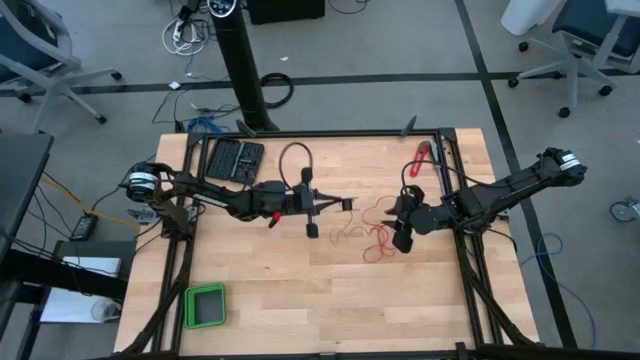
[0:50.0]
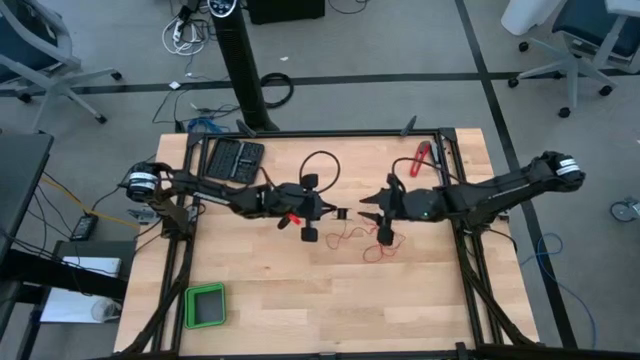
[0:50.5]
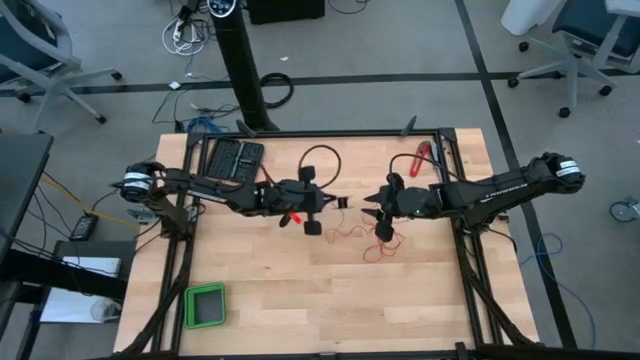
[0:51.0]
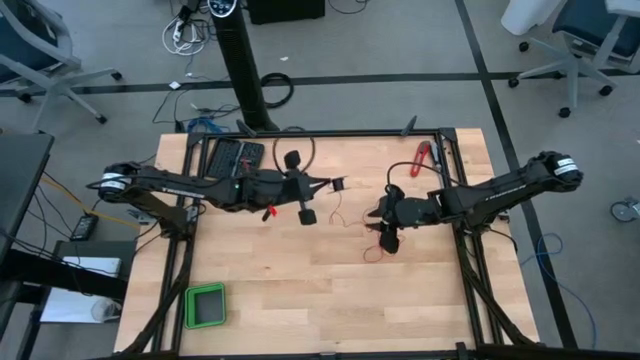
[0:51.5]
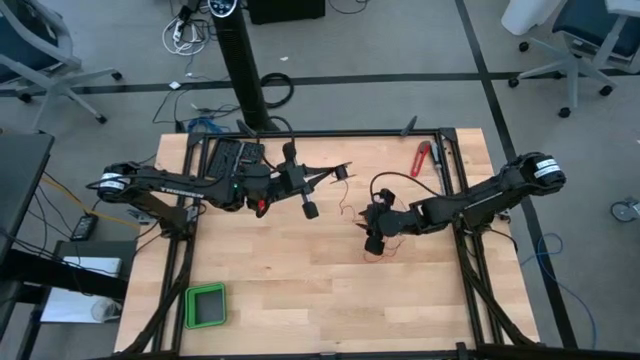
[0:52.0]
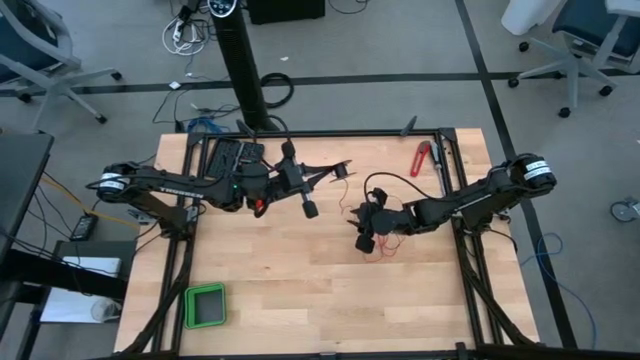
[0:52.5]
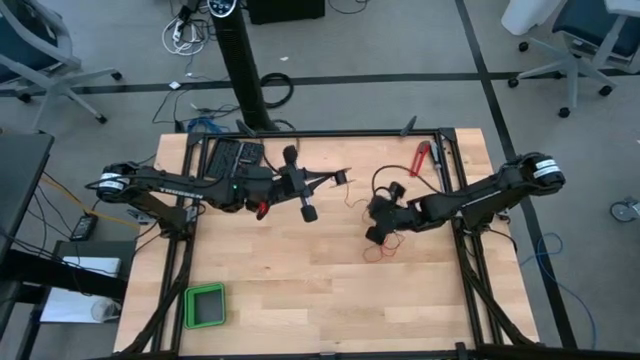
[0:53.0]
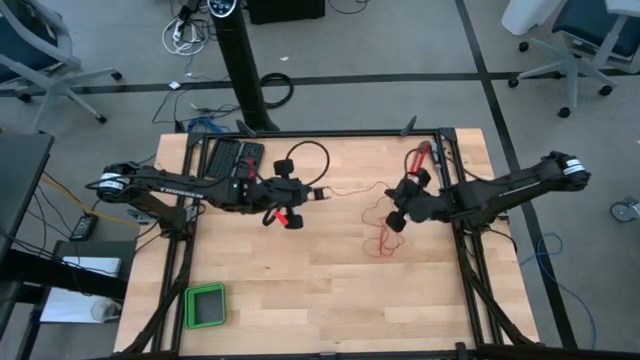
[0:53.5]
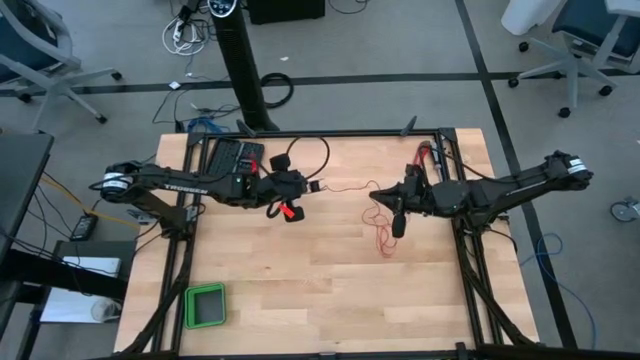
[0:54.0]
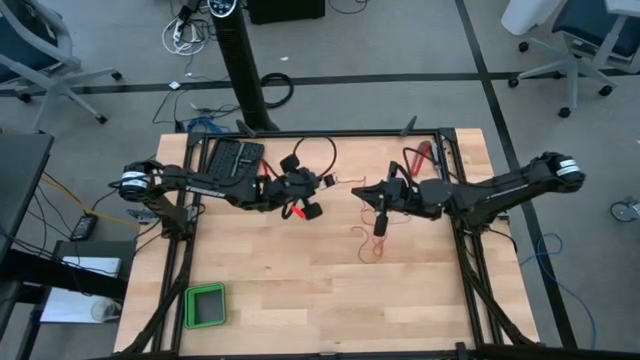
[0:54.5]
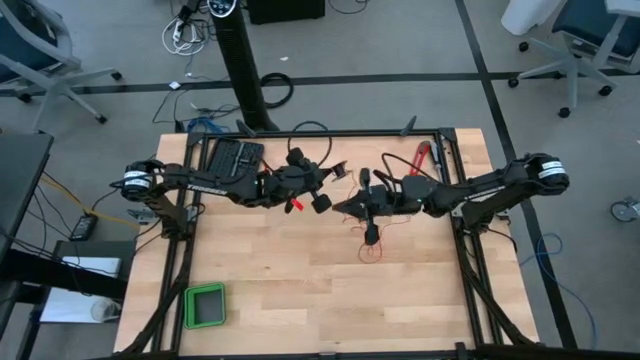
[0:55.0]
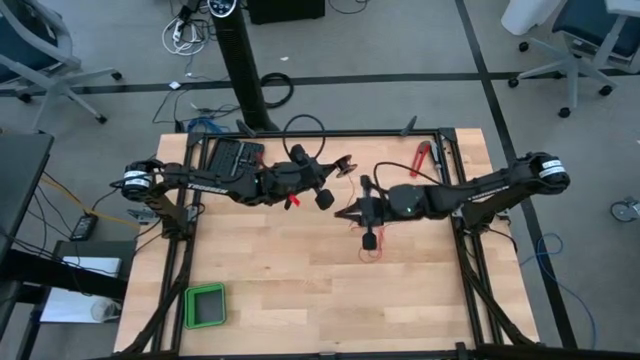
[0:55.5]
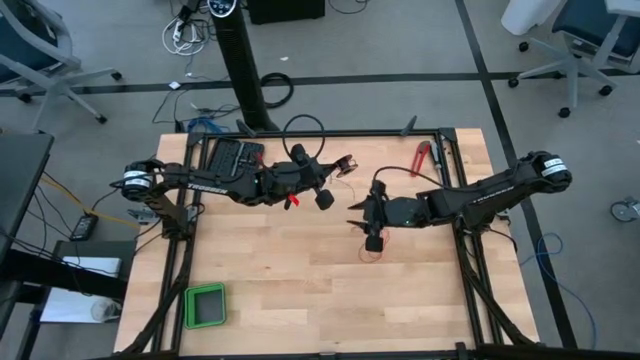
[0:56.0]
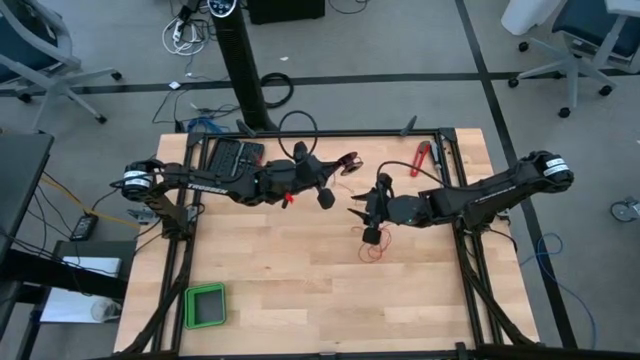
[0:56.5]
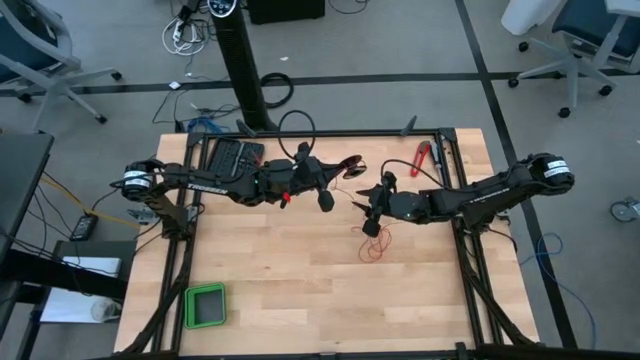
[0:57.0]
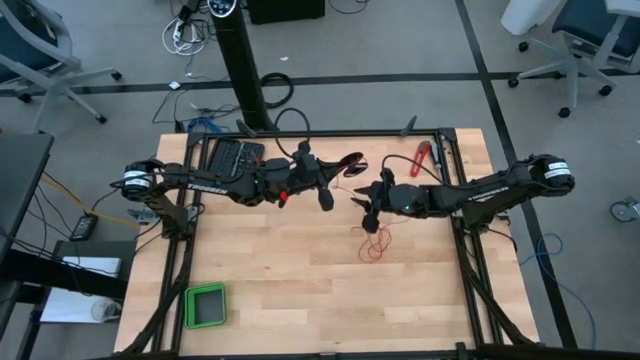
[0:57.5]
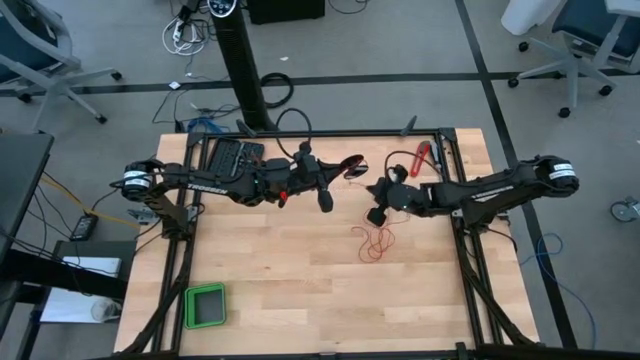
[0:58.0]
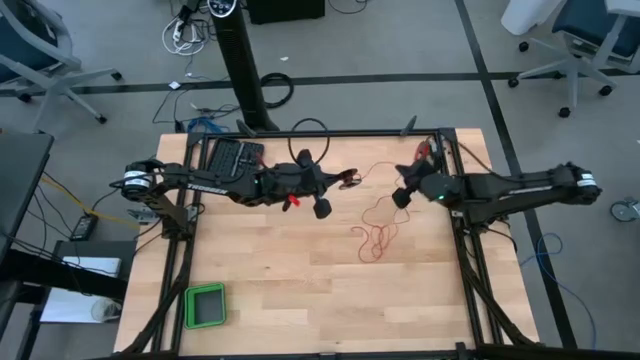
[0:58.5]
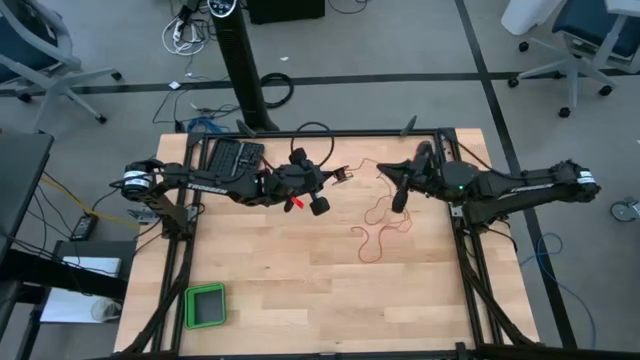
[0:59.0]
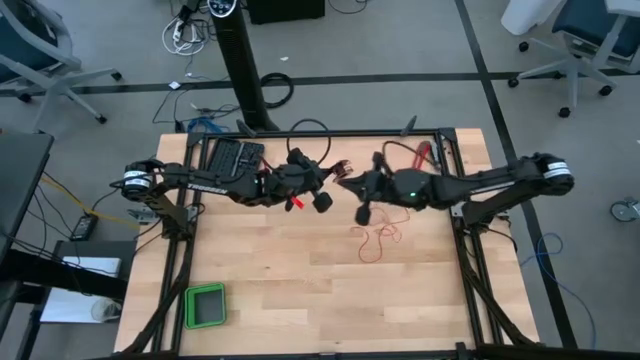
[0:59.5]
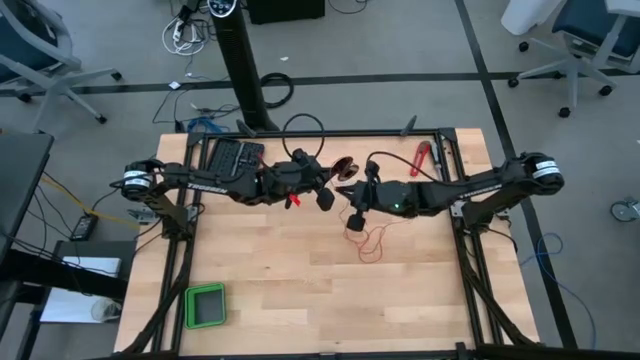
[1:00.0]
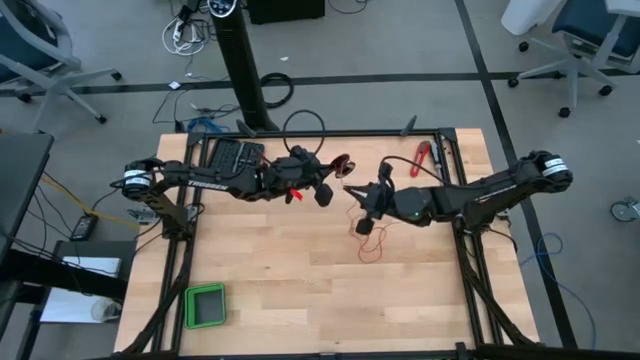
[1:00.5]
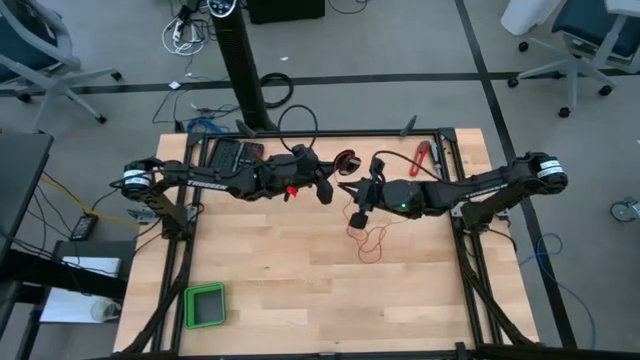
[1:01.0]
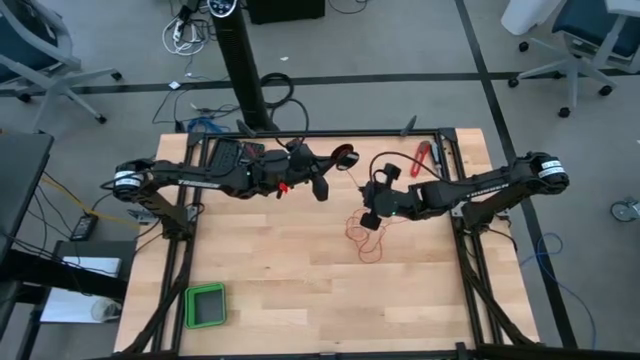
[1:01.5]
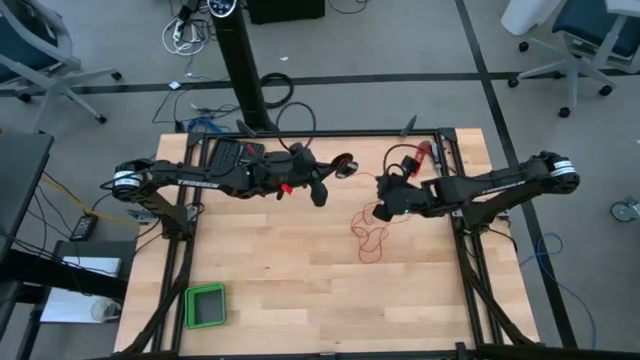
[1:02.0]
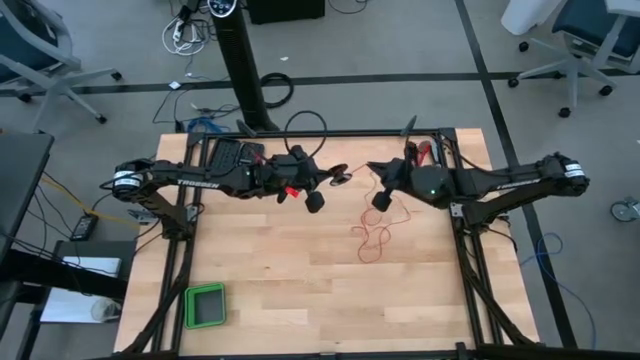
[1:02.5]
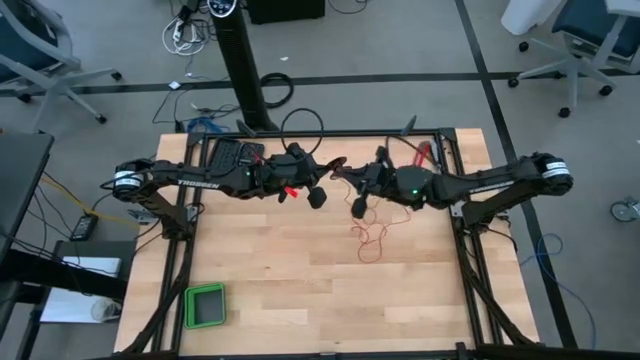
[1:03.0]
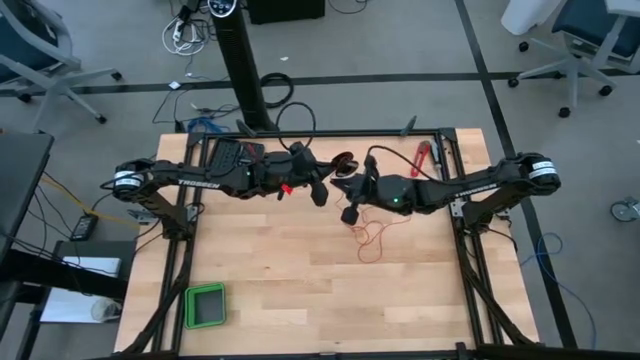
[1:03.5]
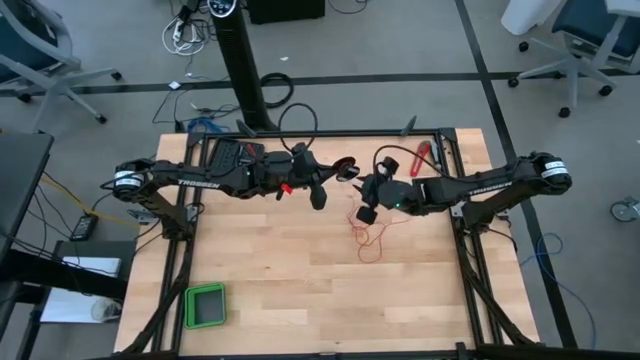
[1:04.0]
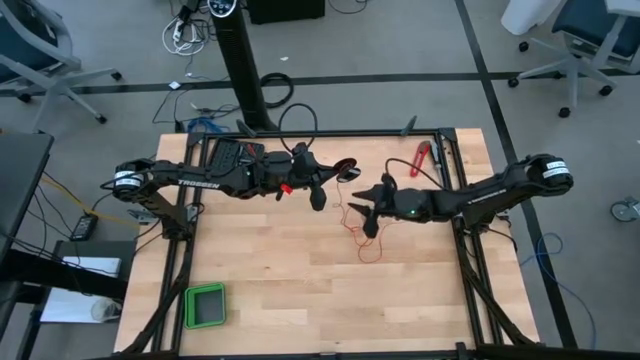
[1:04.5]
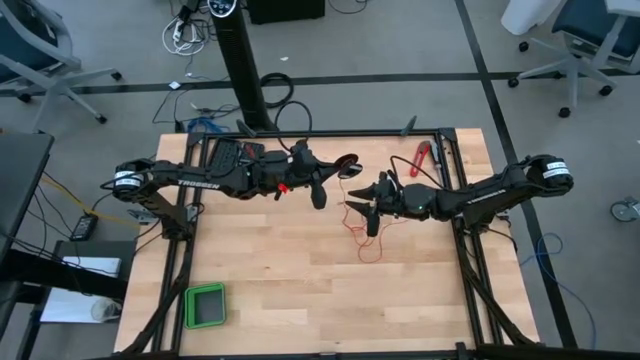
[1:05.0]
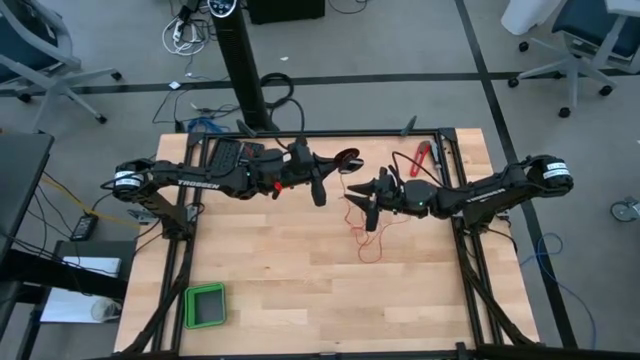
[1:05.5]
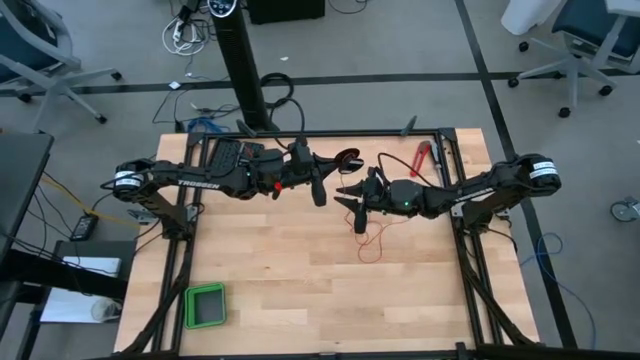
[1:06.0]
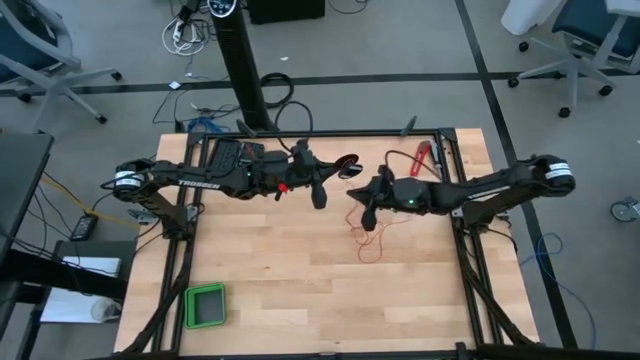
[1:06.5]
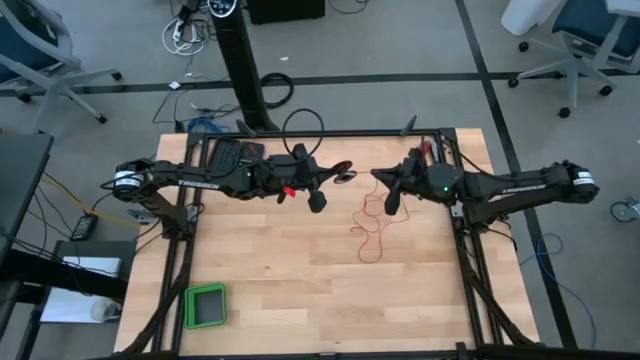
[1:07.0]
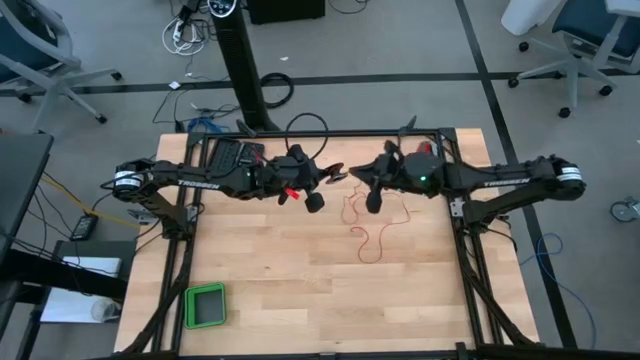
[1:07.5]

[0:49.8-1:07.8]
Task: Coil cords
Coil the red wire onto the black spool

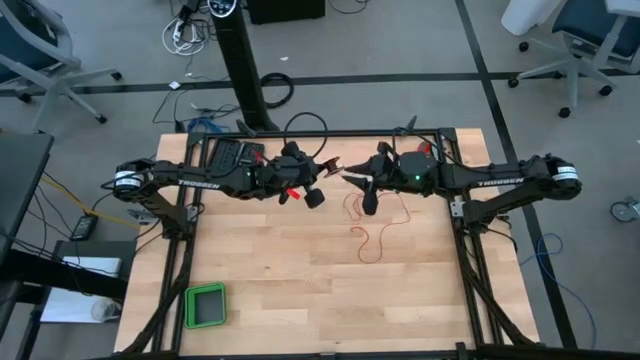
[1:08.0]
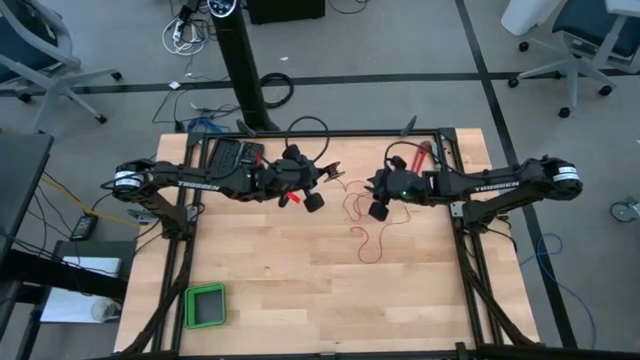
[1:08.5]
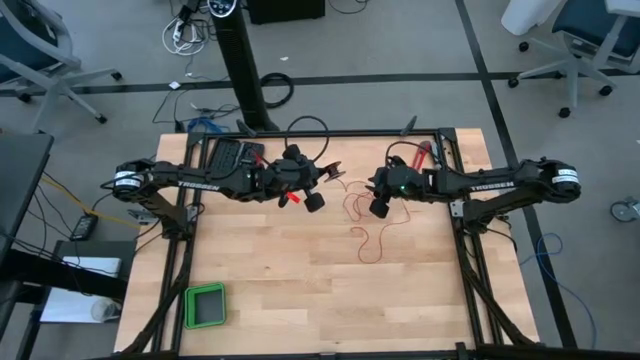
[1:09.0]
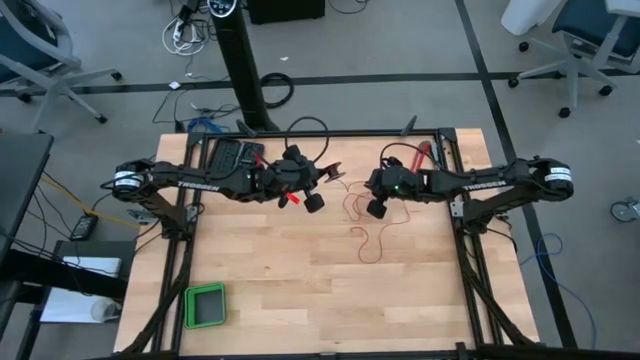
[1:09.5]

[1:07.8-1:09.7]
Coil the red wire onto the black spool

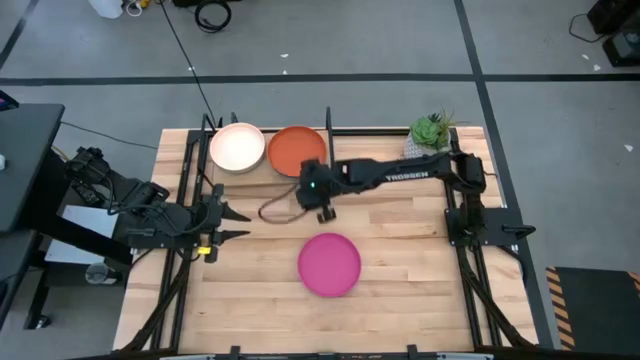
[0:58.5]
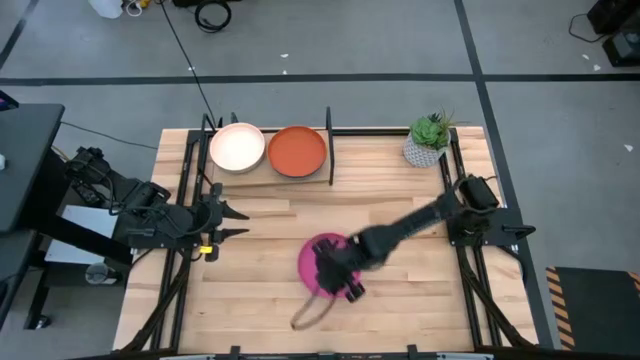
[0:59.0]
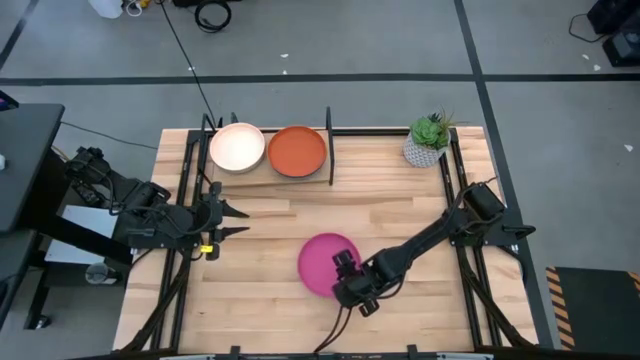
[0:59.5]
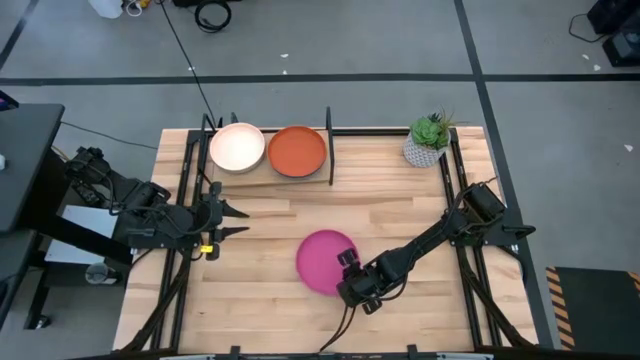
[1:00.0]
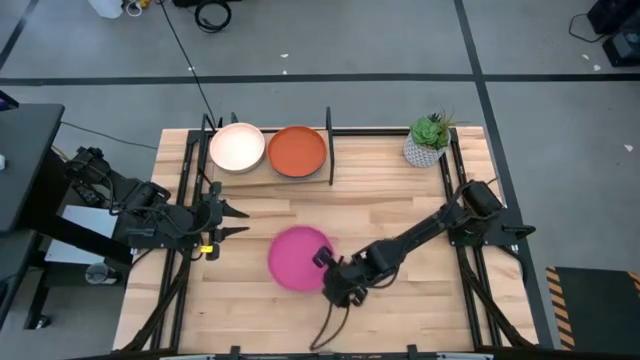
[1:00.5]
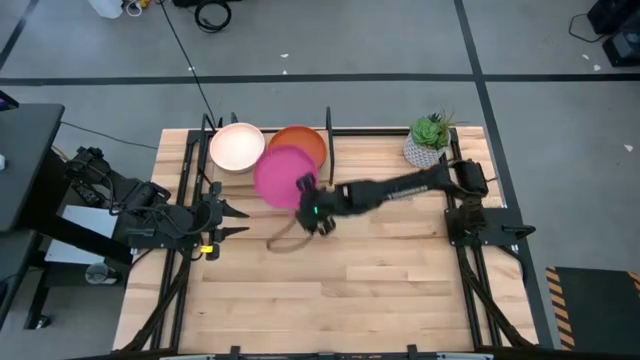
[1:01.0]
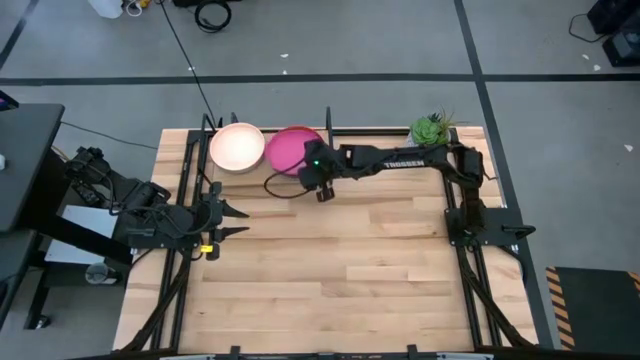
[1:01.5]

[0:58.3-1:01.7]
Task: Place and stack plates onto a shelf
Stack the pink plate on top of the orange plate on the shelf
